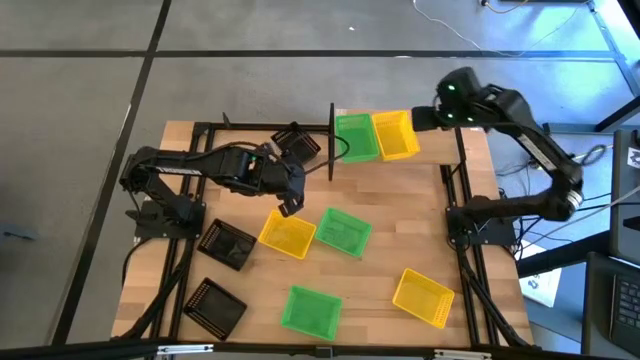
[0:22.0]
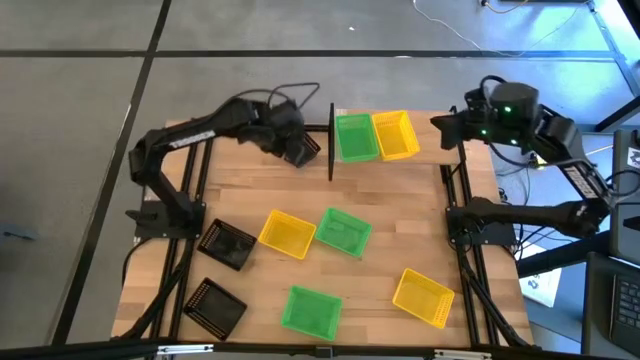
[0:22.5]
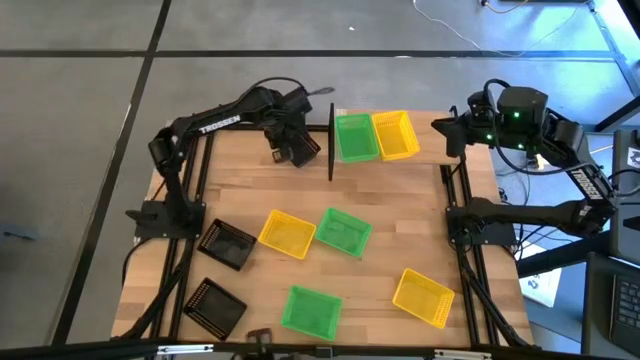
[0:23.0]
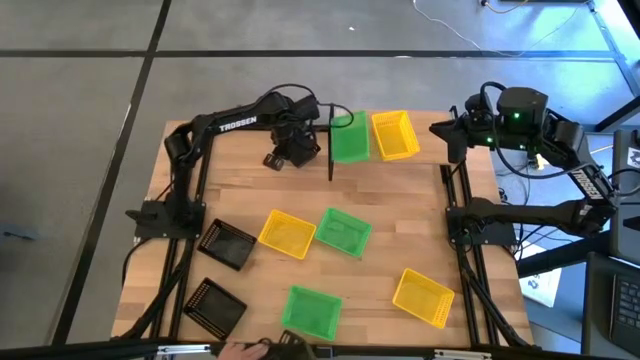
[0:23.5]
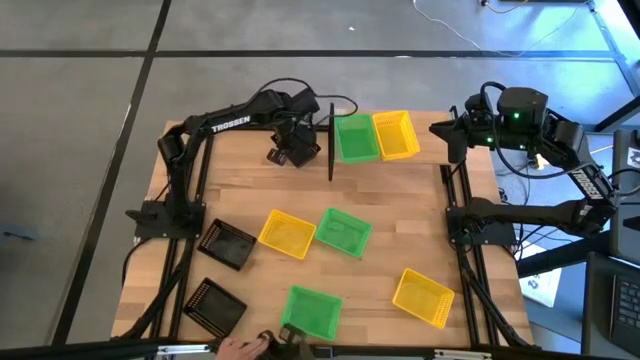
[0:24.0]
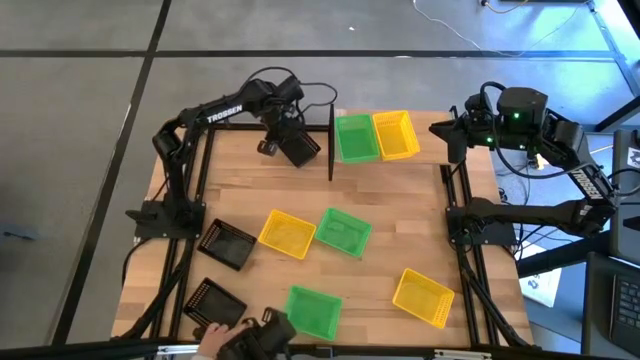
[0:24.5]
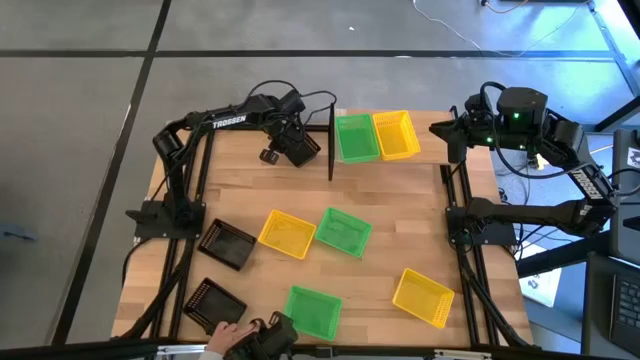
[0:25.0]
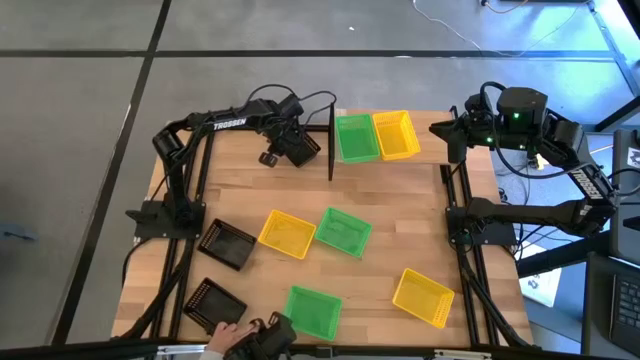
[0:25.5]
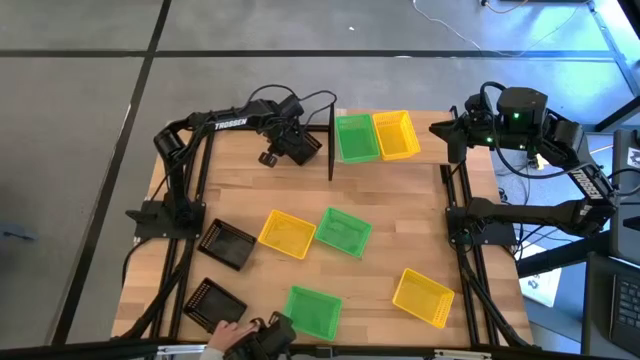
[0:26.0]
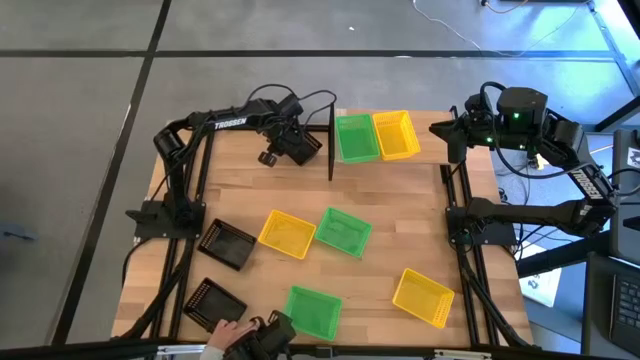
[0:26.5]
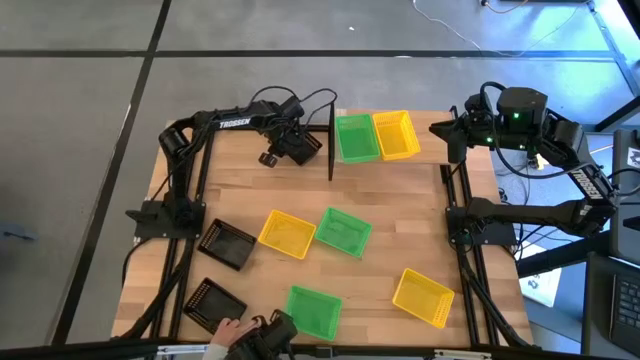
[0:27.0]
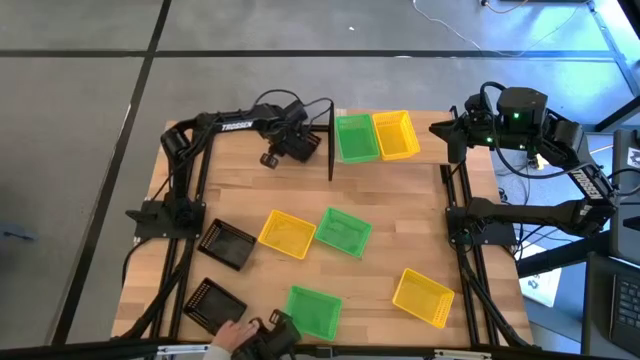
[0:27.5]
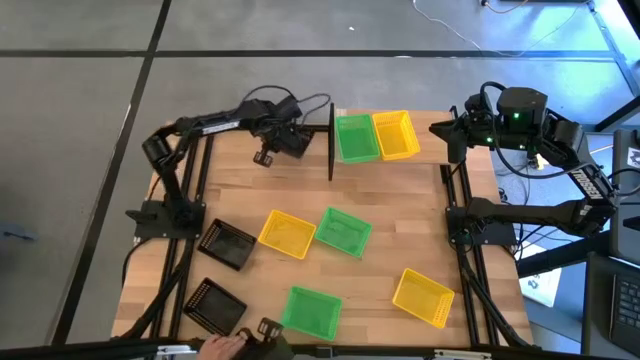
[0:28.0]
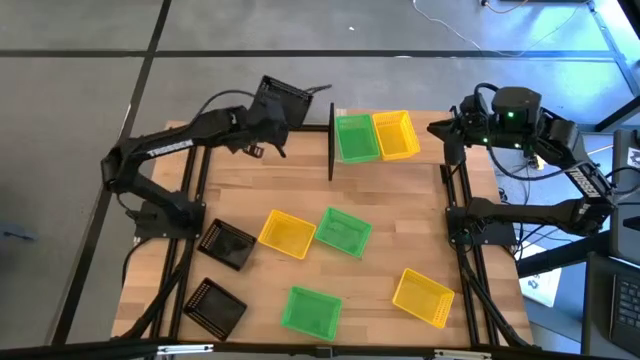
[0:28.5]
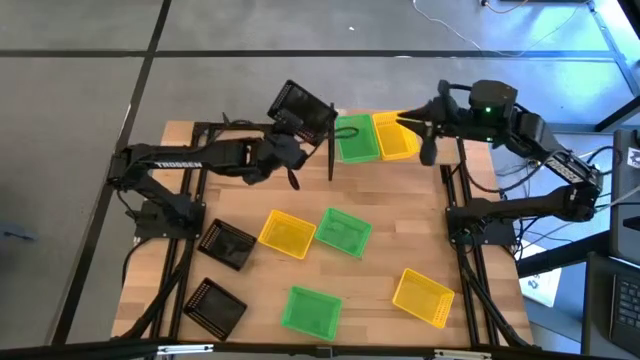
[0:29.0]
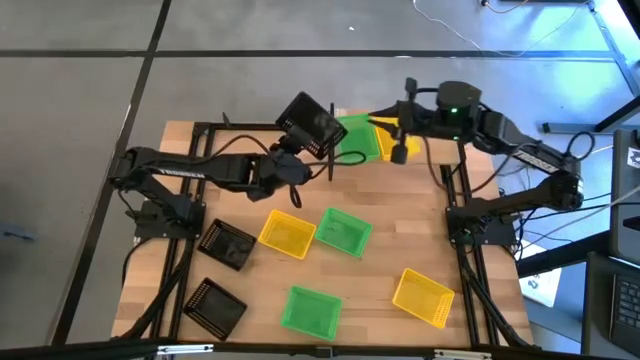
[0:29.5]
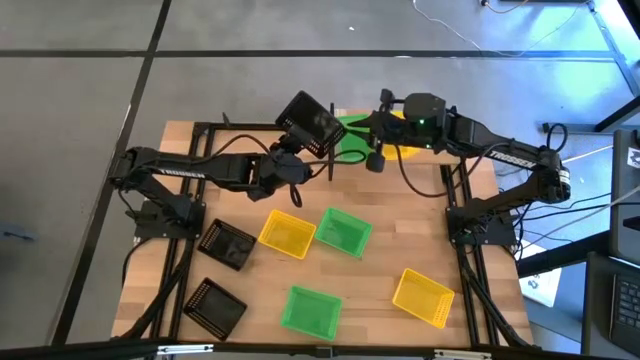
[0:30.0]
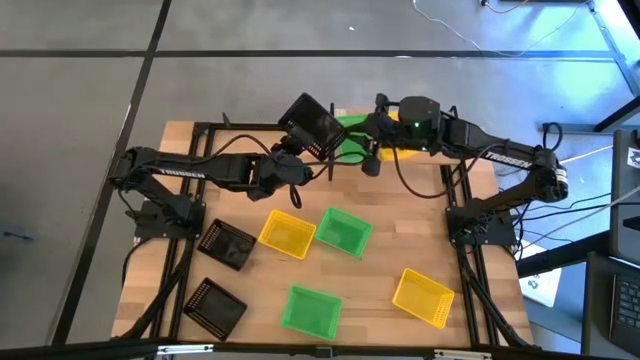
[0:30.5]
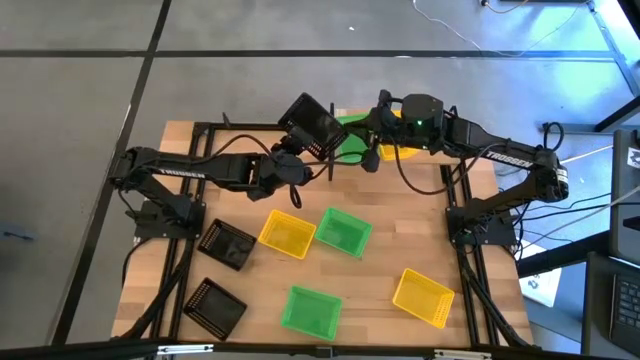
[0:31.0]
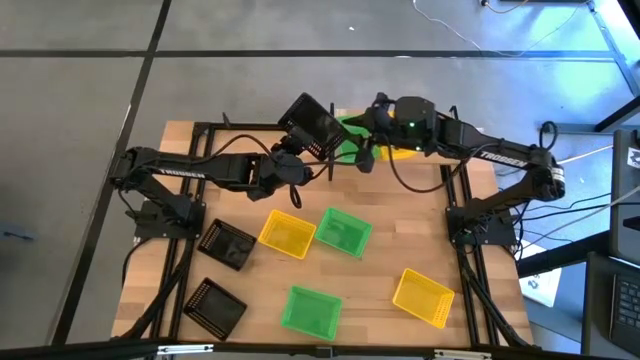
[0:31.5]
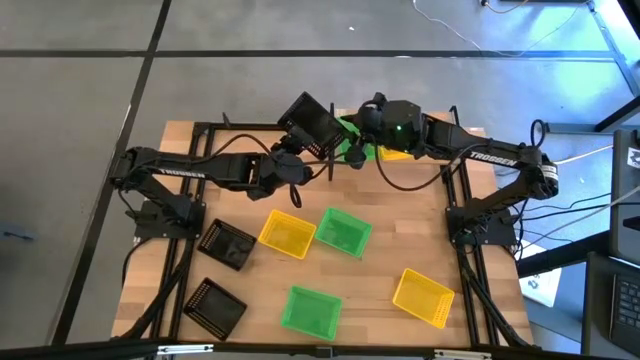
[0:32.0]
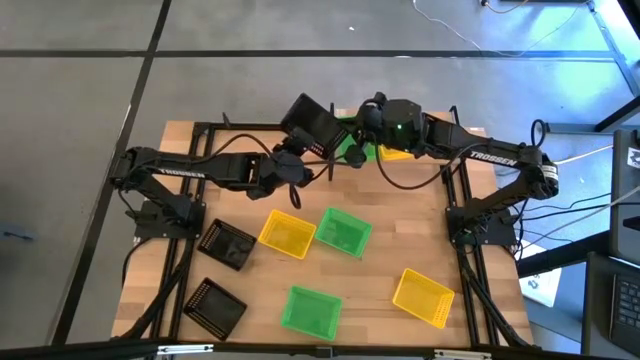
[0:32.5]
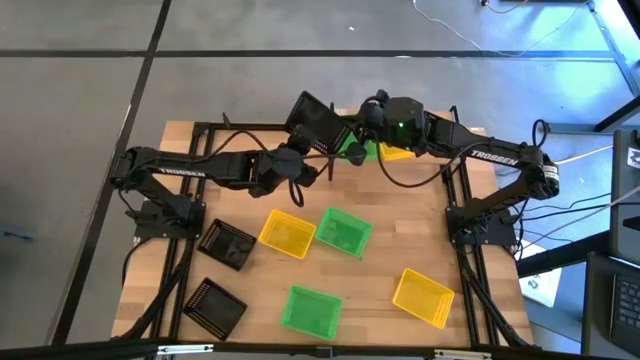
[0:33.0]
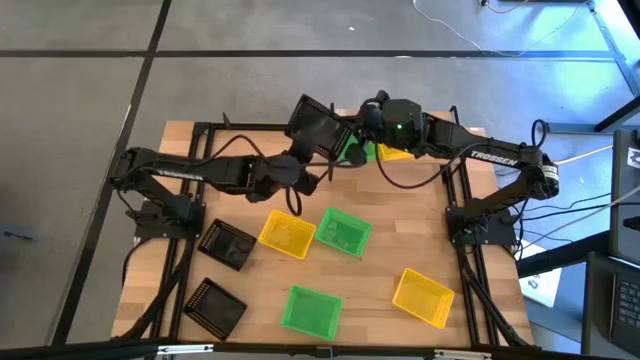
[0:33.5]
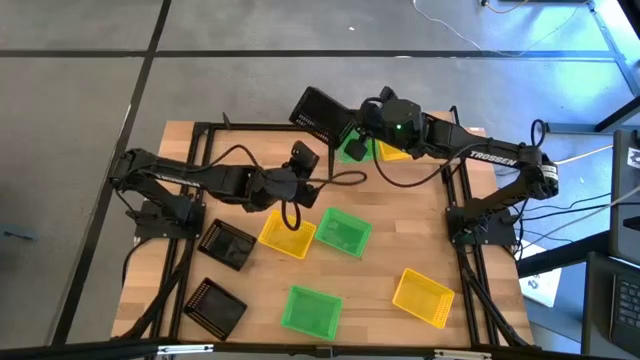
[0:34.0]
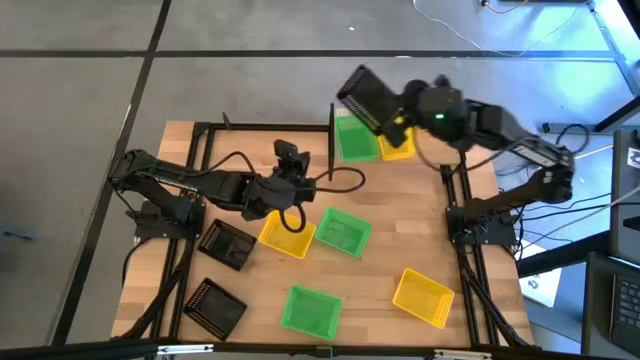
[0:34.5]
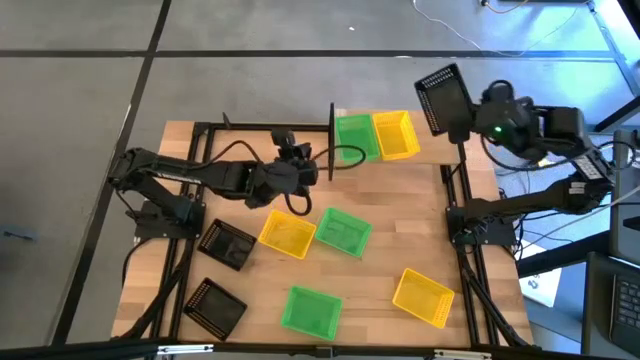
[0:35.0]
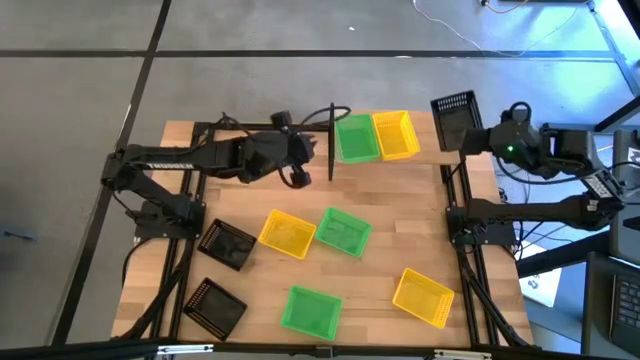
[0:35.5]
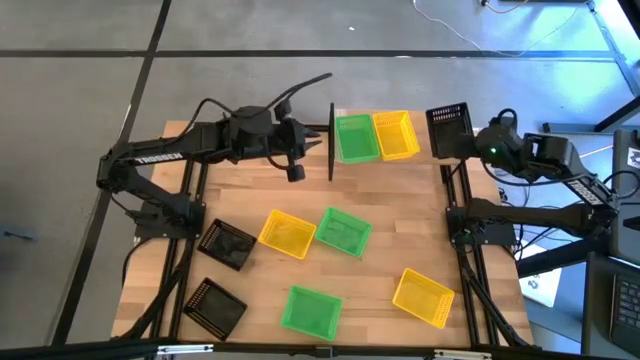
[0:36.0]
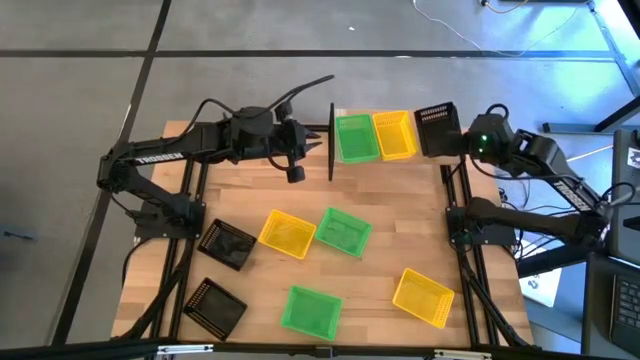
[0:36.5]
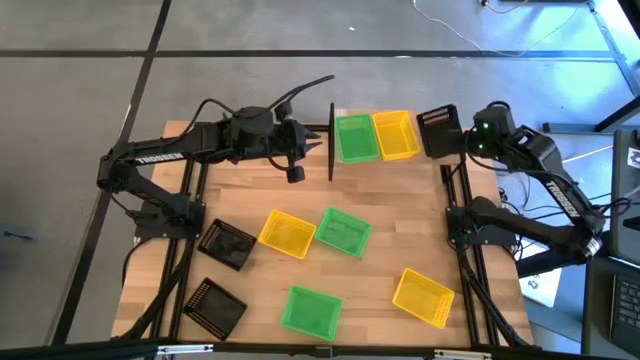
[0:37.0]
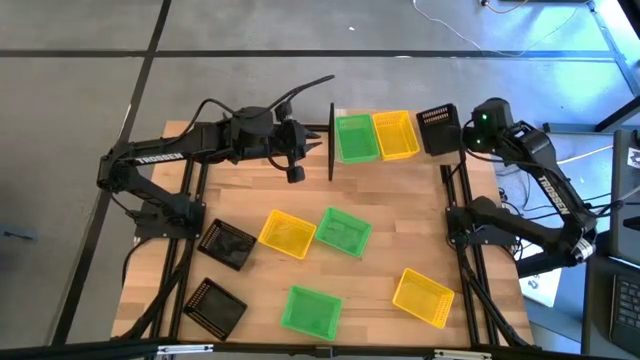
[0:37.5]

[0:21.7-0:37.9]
Task: Stack baskets on shelf by color
Put the top black bin on the shelf

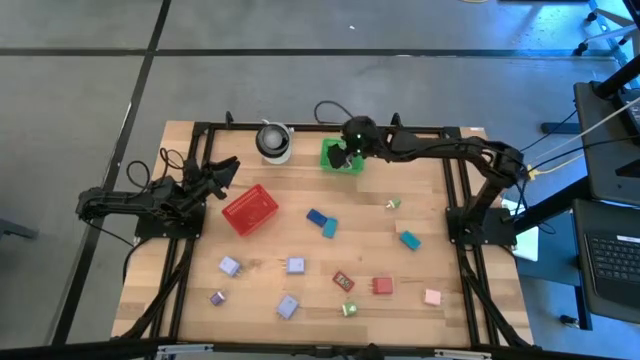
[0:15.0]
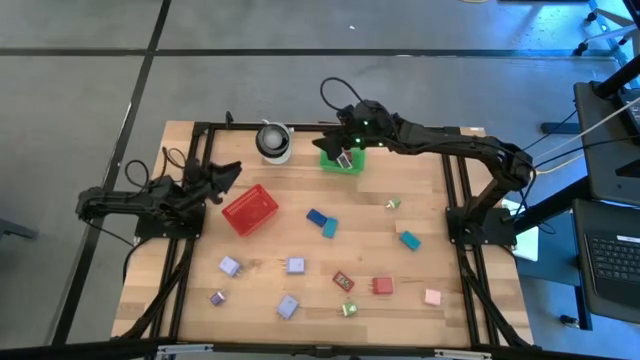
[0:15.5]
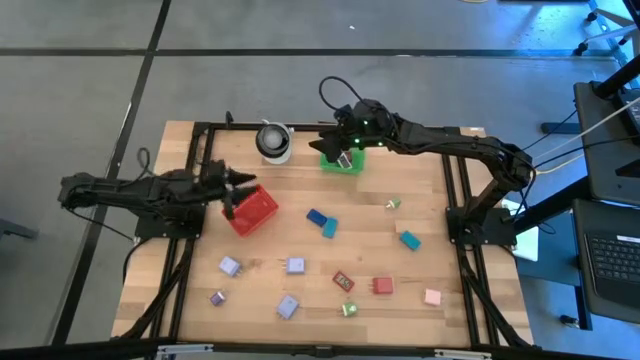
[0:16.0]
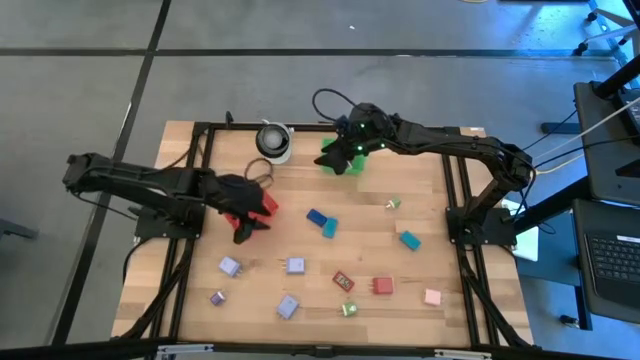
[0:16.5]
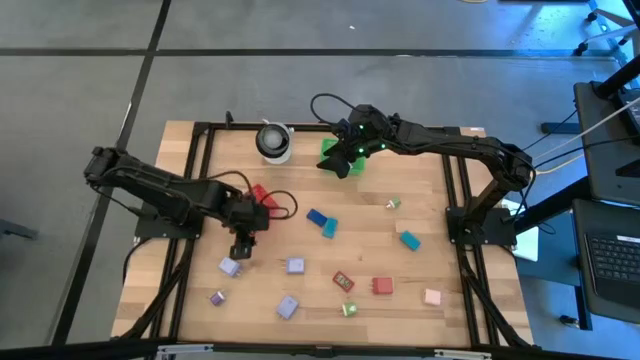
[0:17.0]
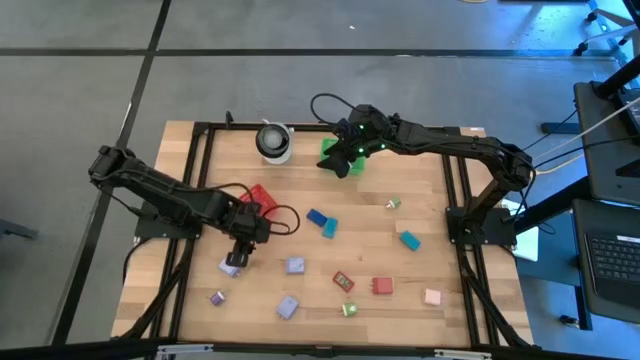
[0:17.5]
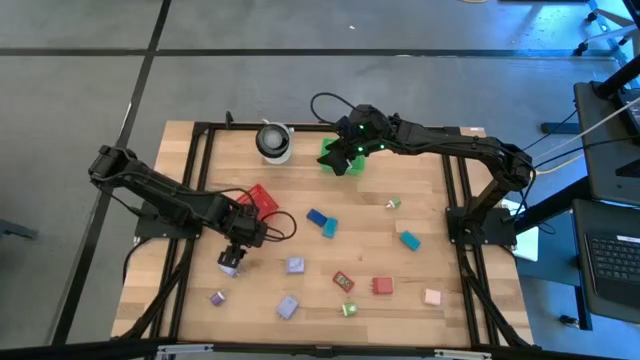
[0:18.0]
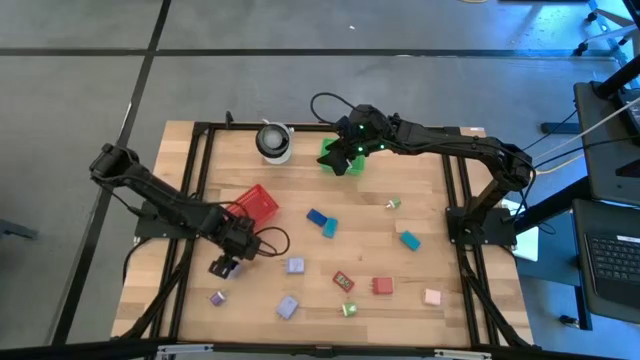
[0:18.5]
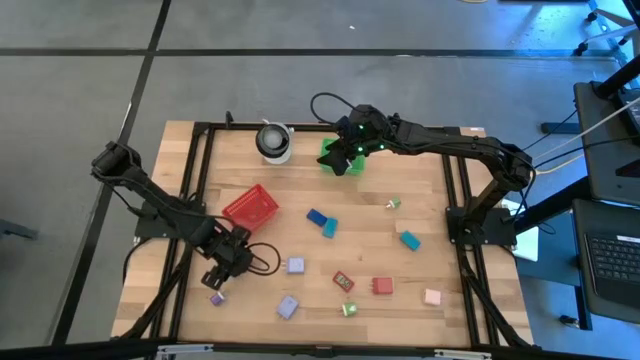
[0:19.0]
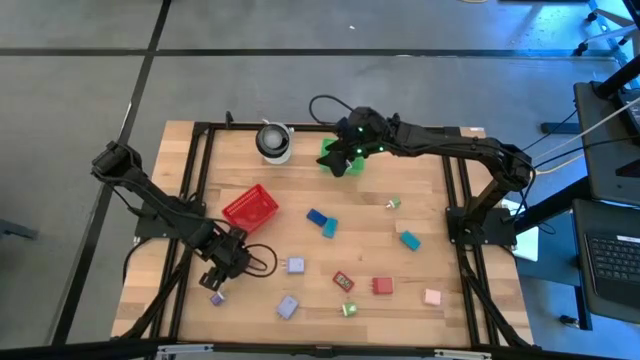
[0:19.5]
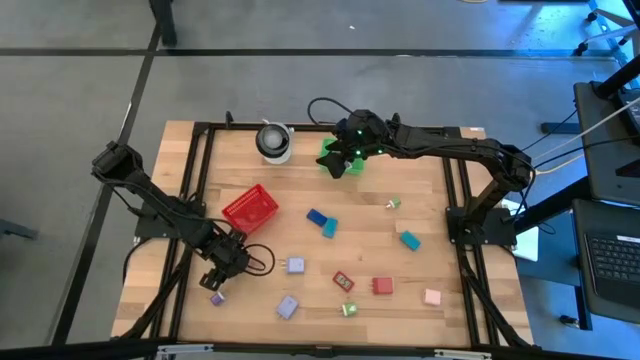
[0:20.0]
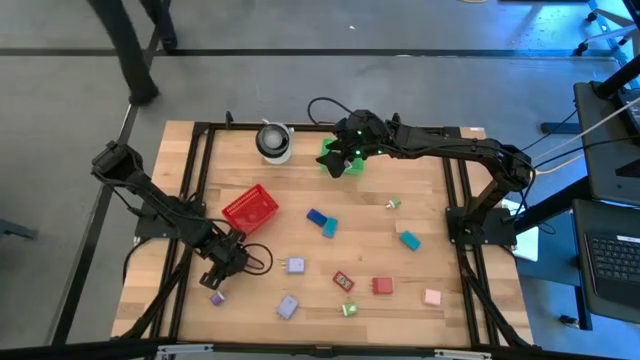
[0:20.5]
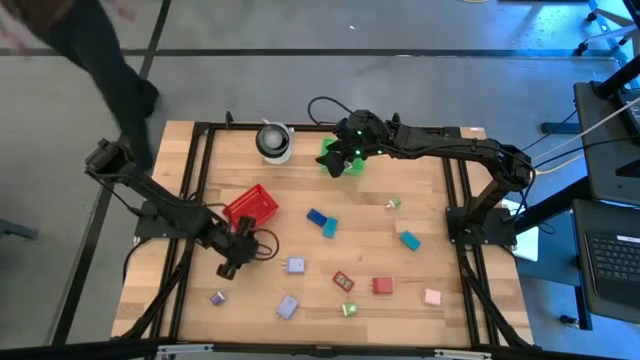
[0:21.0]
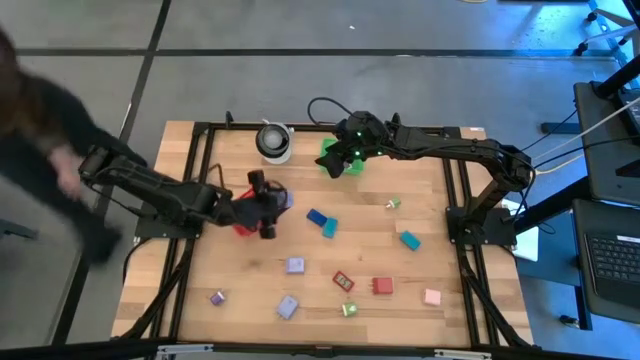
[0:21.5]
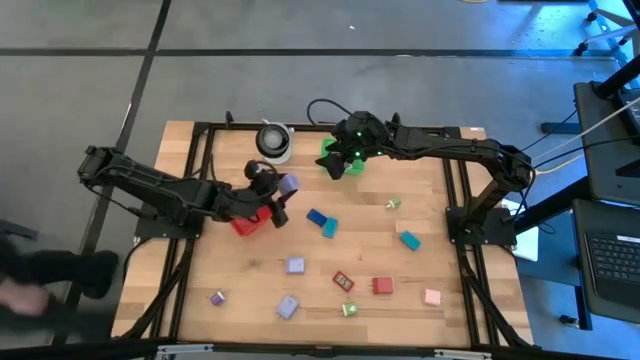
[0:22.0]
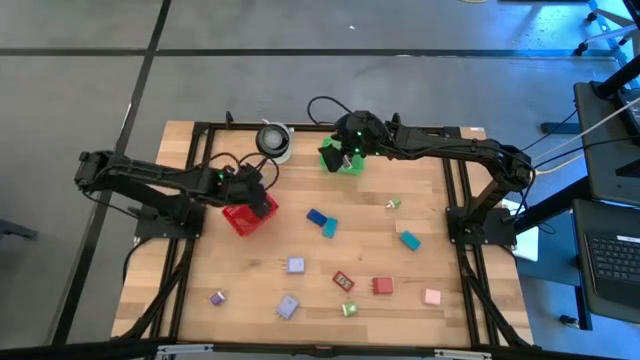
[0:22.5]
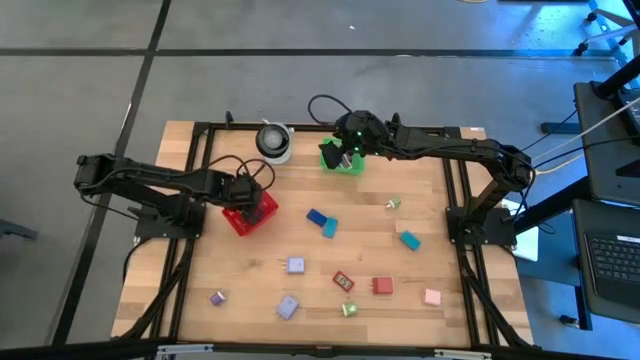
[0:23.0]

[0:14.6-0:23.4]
Task: Pick & Place Office items
Put the top left light purple charger adapter into the red bin
